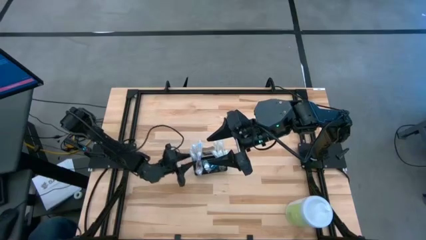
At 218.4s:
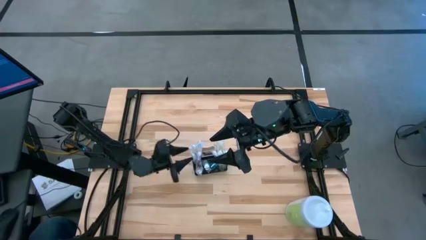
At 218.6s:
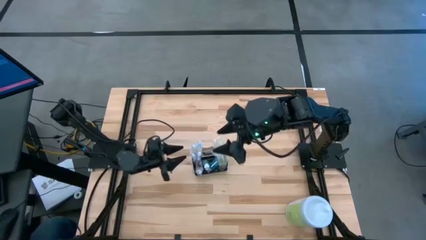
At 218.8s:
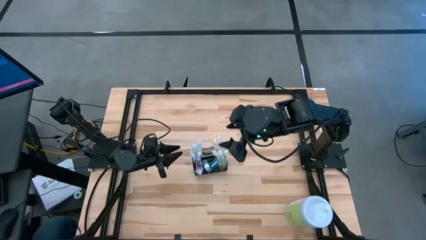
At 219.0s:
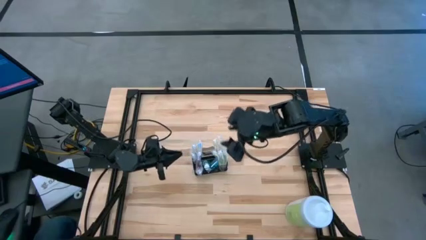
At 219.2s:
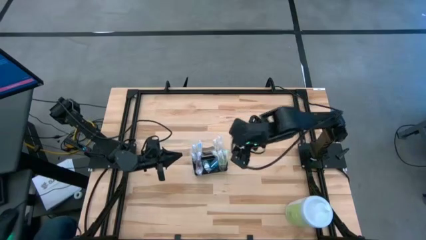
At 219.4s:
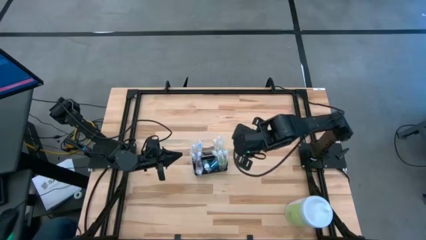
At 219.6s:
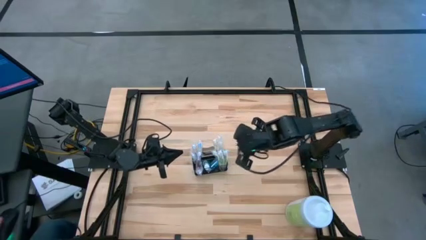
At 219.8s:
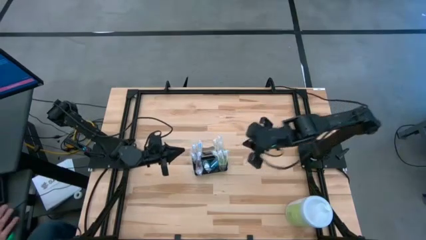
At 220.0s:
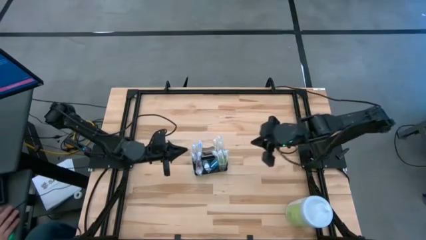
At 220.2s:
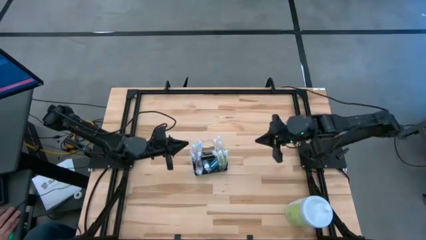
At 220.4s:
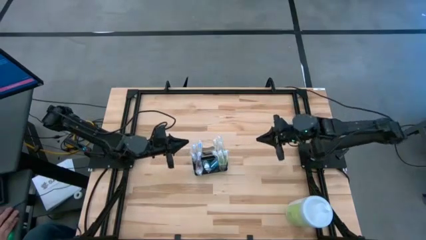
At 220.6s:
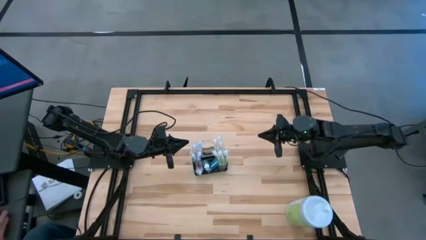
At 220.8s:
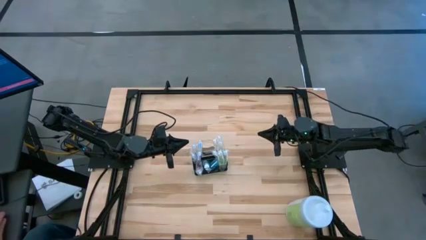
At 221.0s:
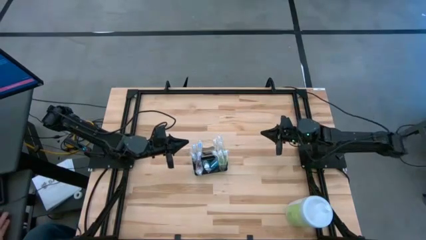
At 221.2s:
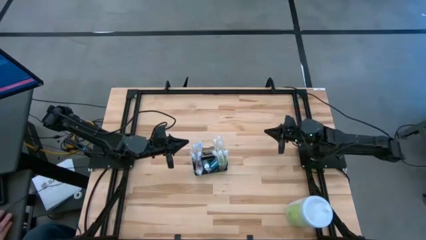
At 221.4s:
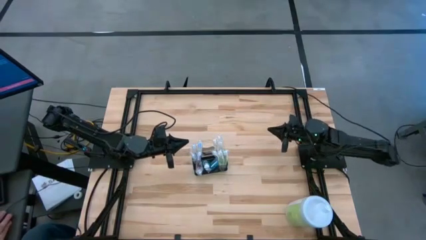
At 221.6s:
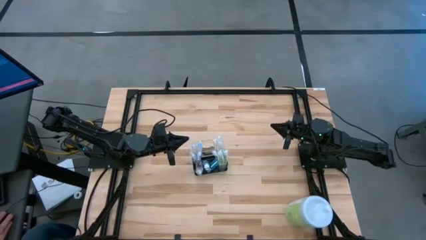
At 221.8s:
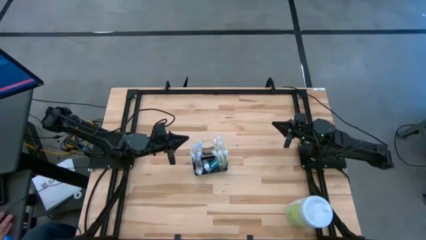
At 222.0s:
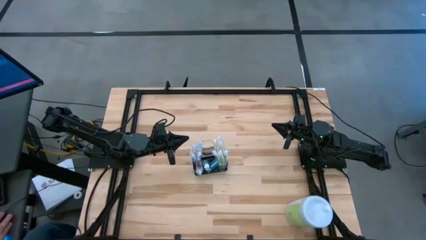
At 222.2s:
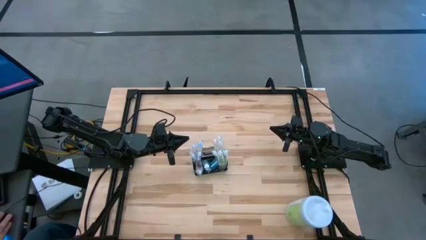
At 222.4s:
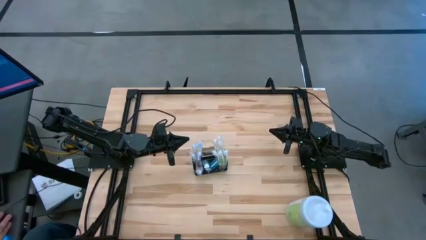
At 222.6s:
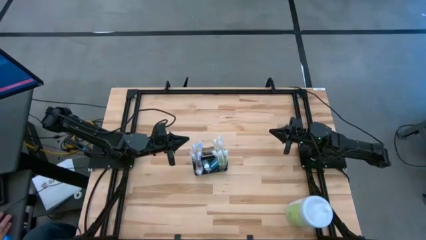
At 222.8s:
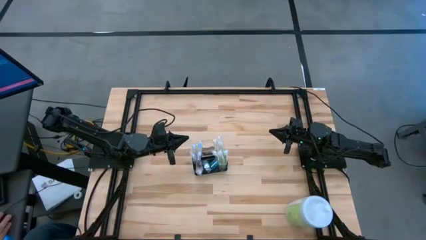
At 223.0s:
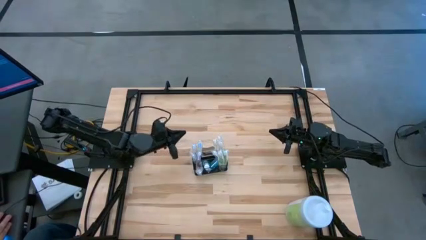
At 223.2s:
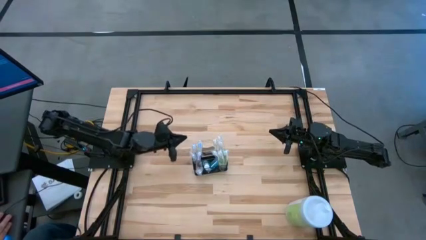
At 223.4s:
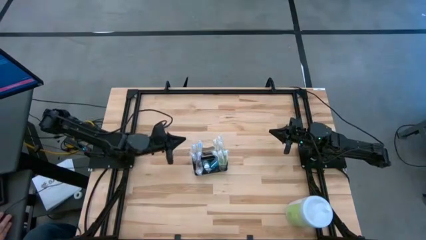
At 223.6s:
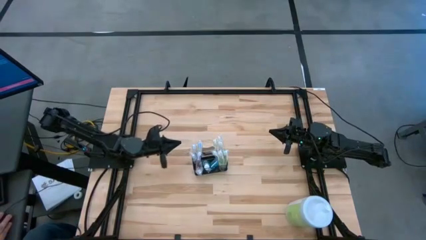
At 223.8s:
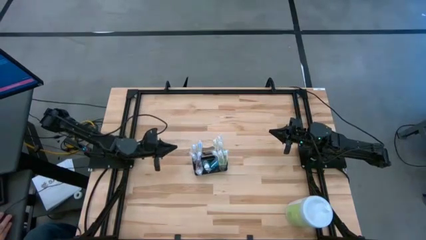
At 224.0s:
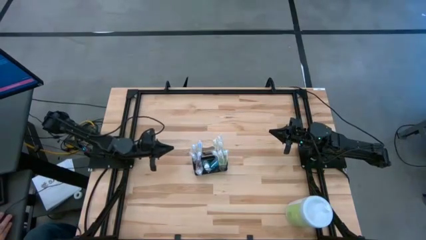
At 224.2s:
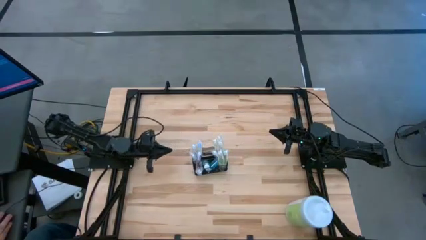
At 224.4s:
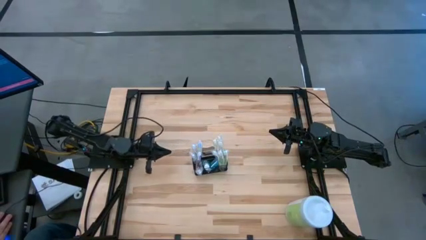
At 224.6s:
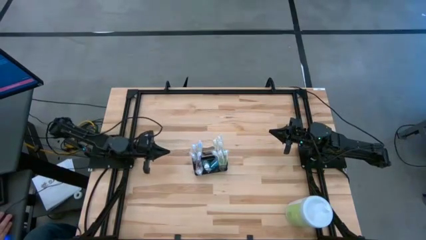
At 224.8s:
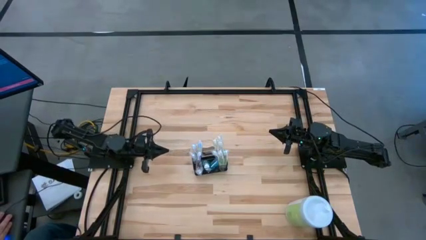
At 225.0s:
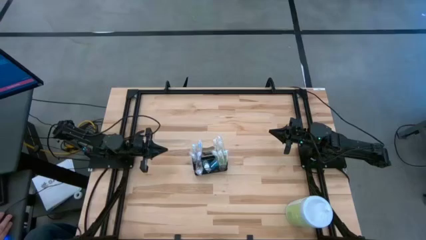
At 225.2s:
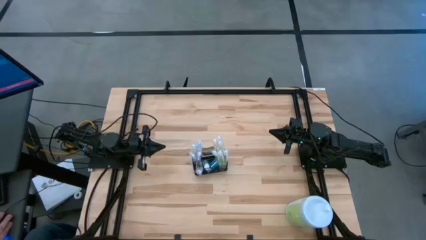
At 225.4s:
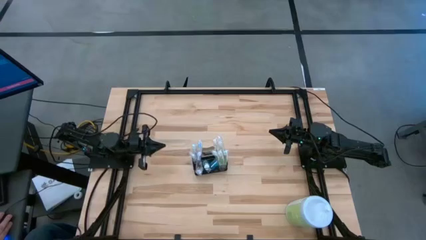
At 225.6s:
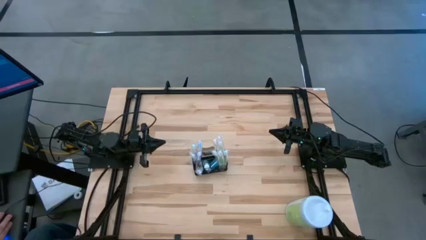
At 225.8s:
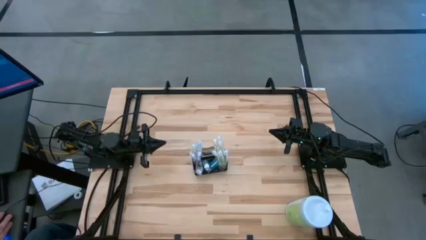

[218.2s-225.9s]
Task: Pick & Place toothbrushing station
Return to Home Position

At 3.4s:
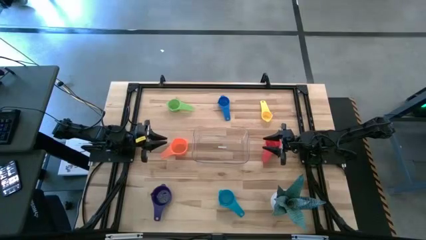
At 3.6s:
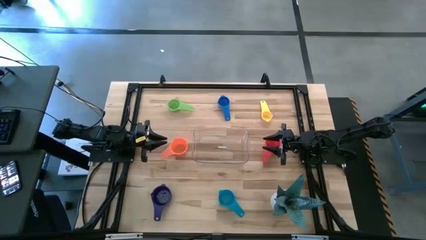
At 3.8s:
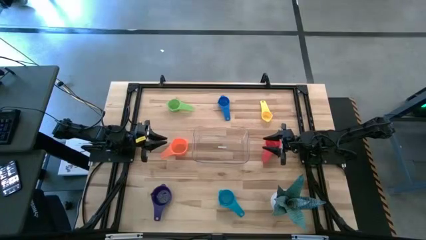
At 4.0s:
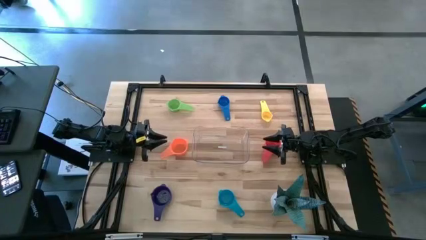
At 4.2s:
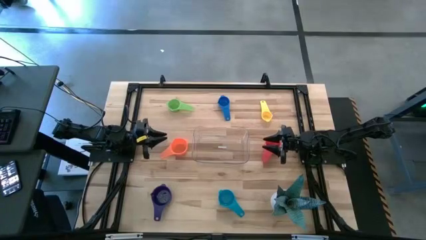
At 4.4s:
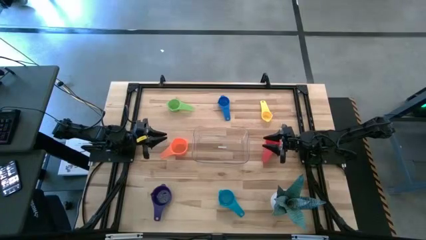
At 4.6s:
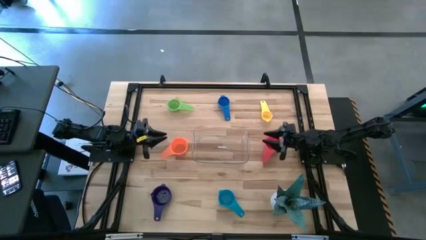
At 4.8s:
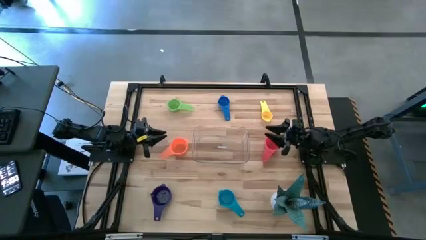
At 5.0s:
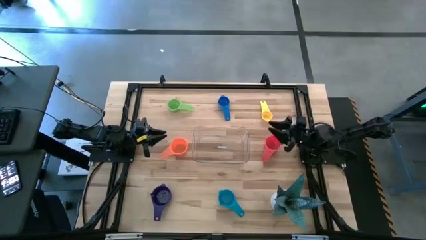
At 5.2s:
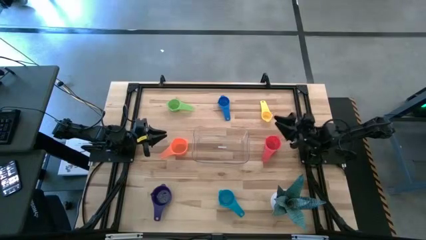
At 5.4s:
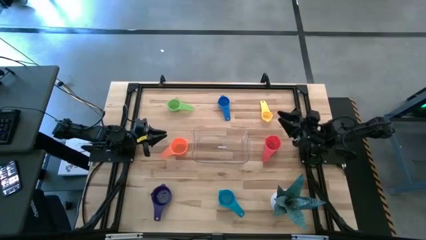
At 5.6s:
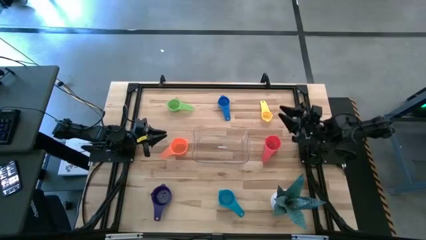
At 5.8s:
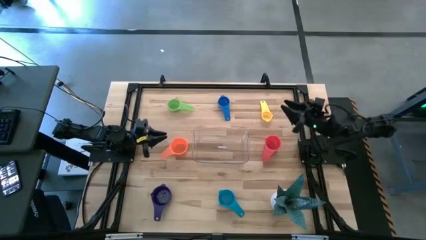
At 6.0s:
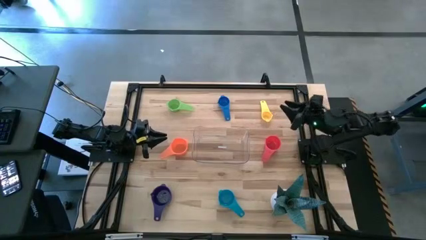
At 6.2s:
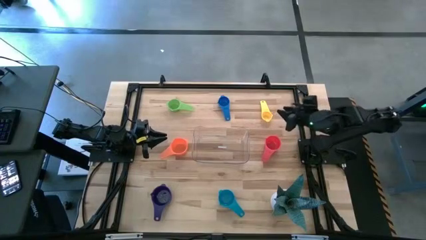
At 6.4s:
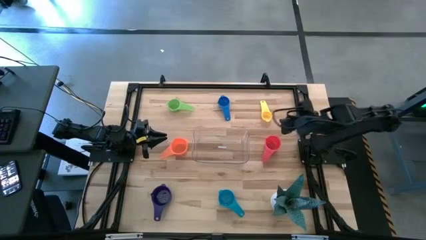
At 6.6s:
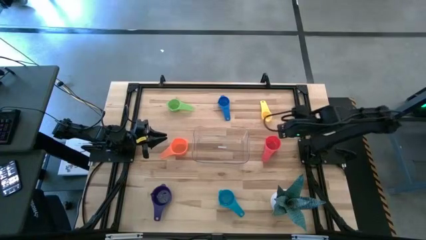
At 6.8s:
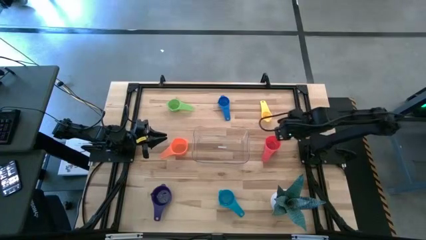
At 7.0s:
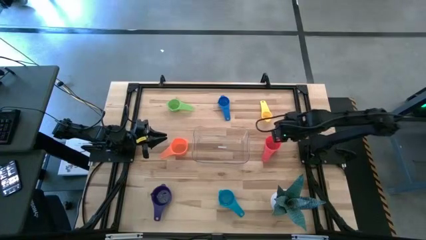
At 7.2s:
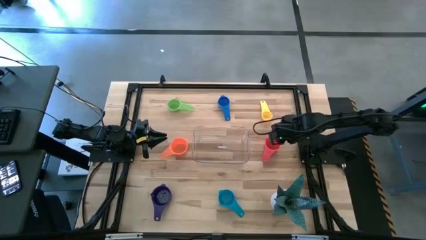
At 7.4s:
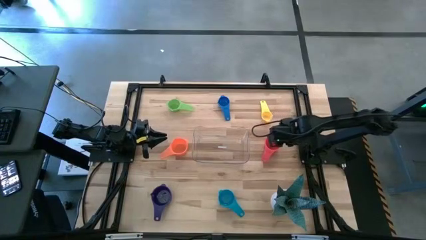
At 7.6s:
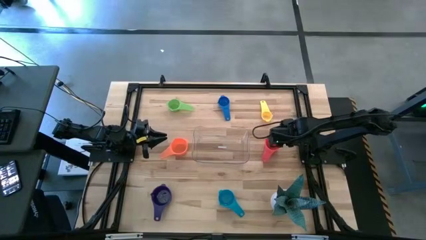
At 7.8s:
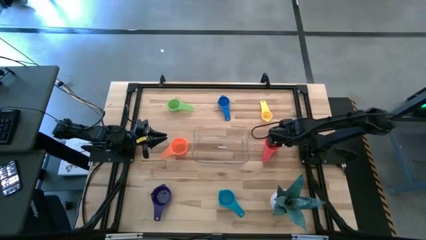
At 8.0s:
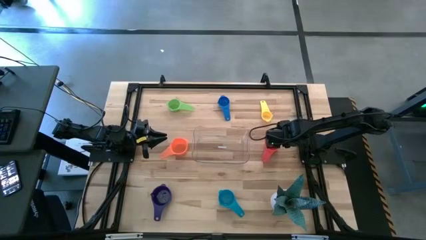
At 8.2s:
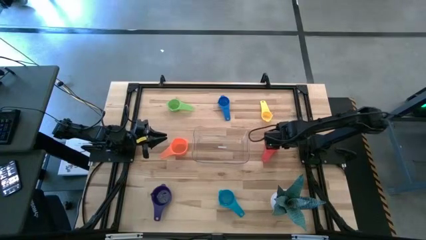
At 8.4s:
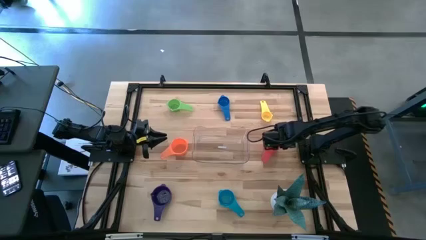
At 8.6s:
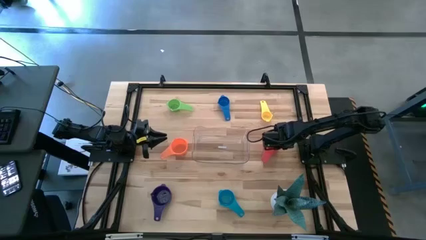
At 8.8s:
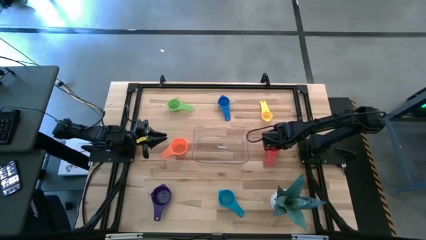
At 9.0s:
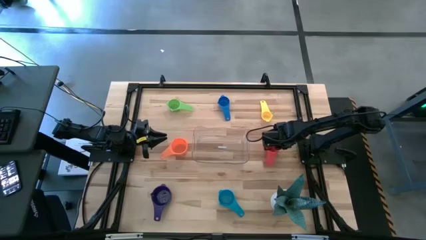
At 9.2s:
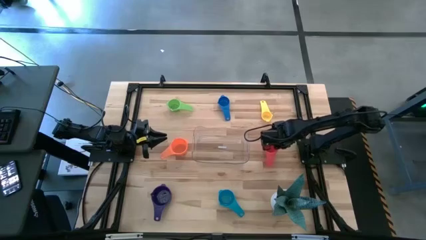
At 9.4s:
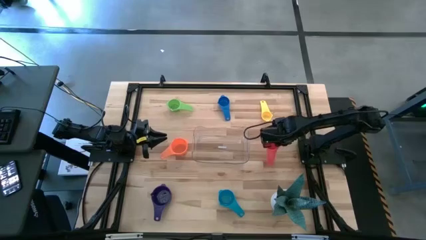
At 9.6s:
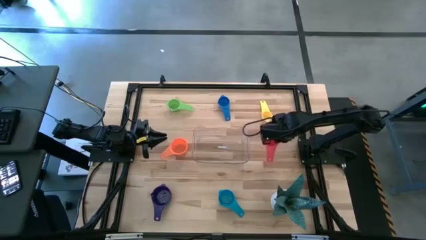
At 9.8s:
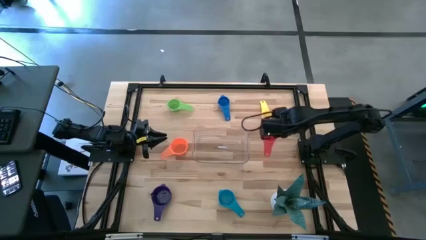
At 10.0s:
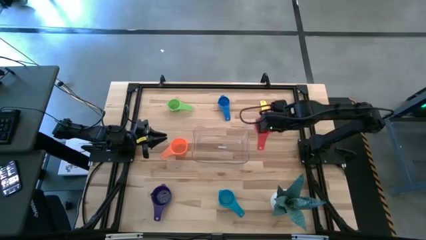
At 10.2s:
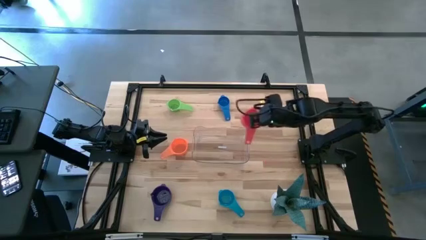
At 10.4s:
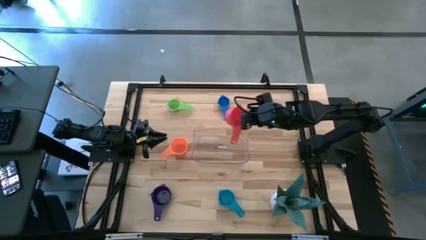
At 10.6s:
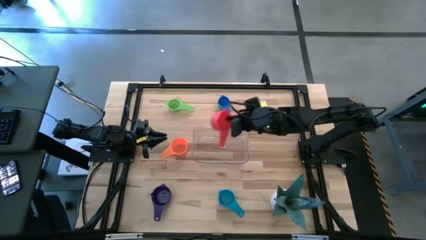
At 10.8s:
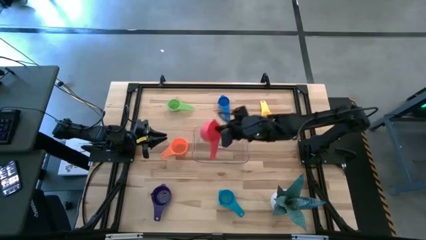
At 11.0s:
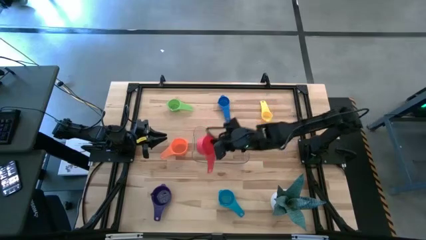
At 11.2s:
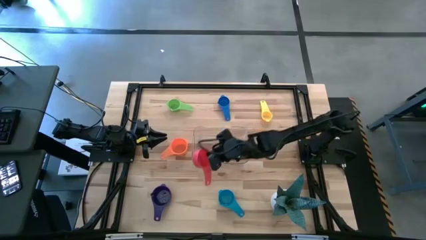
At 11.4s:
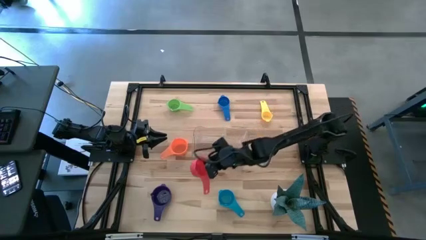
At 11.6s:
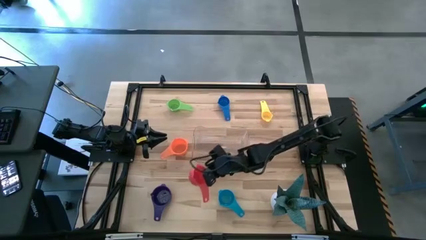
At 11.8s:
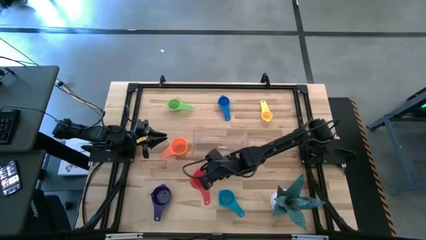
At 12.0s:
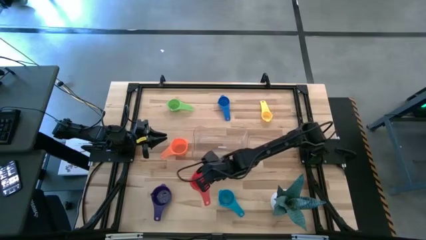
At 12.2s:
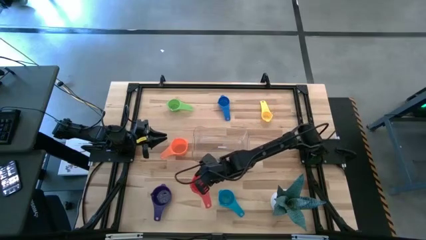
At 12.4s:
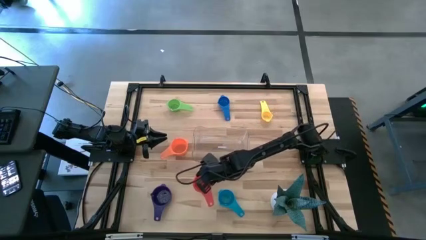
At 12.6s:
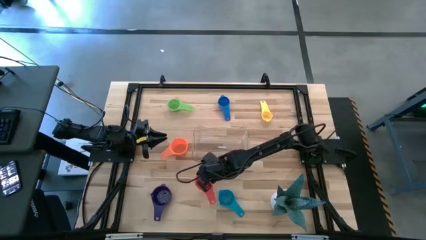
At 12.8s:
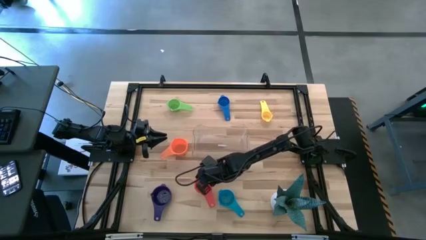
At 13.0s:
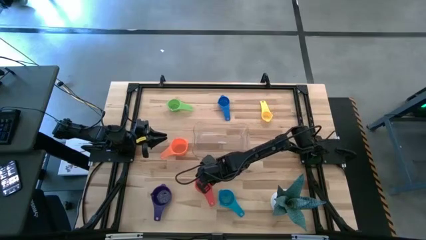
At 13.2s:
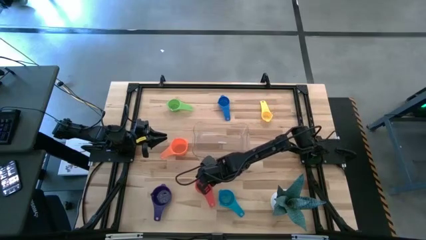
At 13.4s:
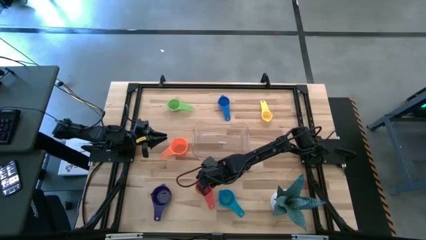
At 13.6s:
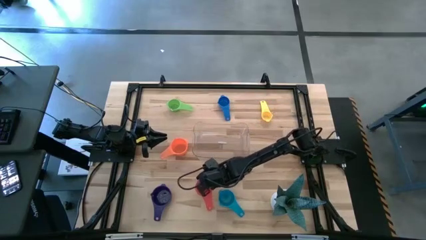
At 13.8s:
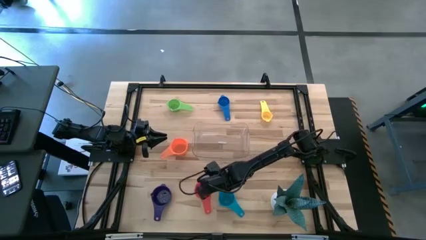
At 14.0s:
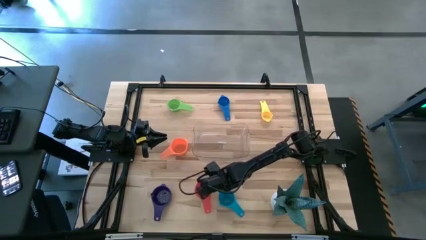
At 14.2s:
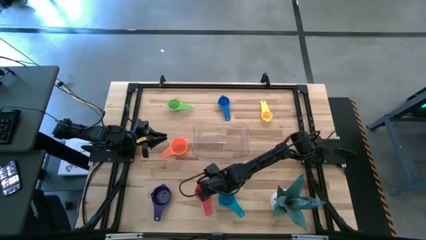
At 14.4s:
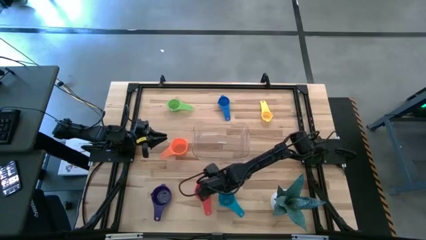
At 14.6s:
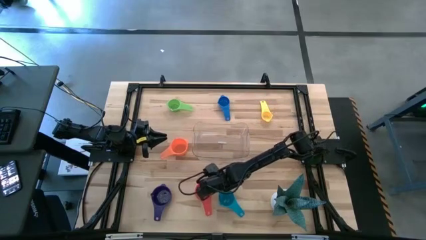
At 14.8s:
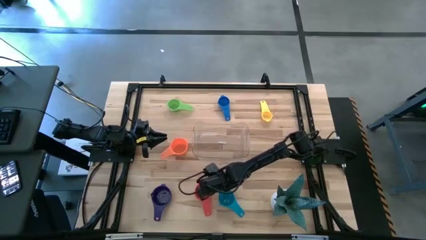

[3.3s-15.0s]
Task: Nest measuring cups in basket
Move the red measuring cup to the bottom center of the table
